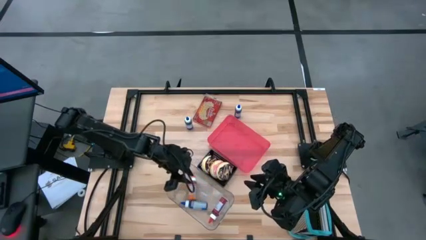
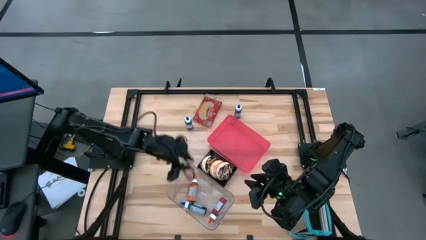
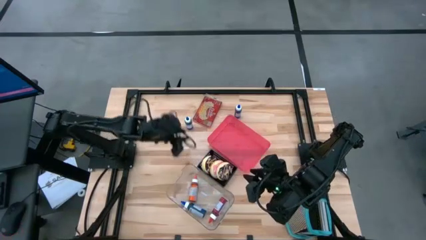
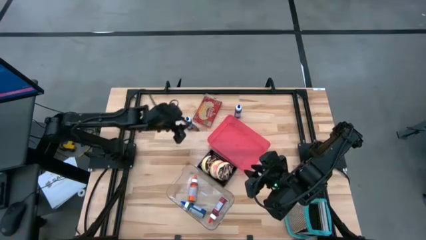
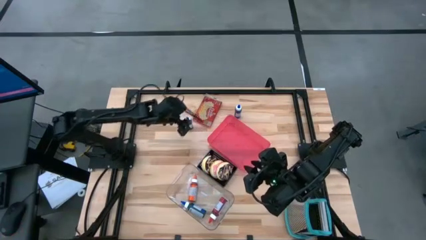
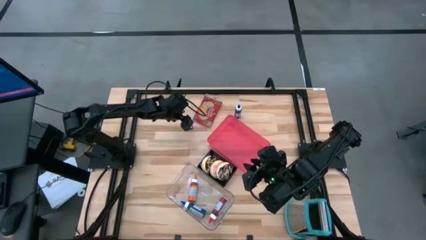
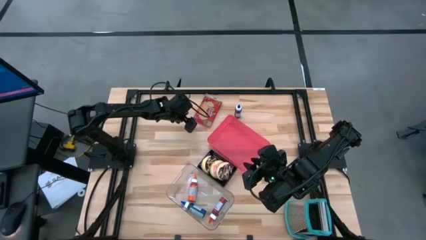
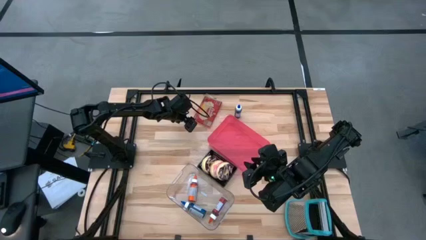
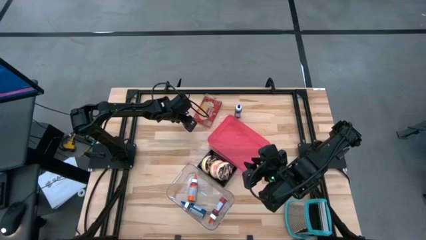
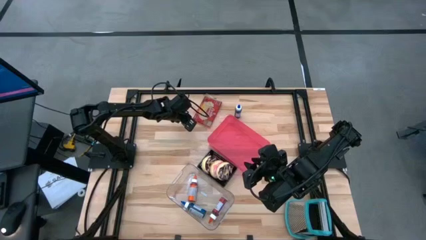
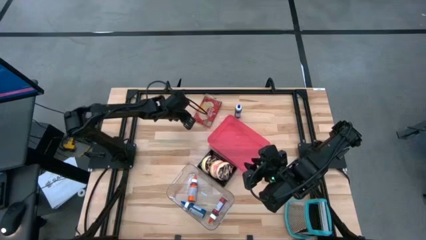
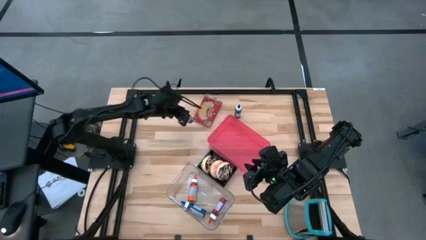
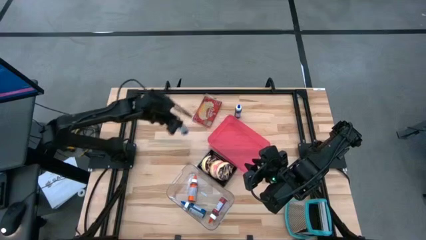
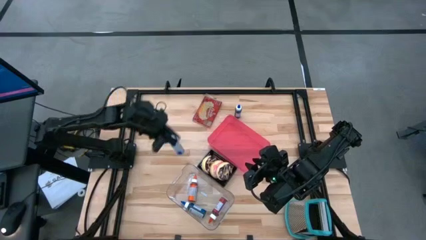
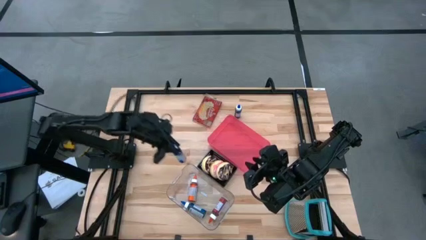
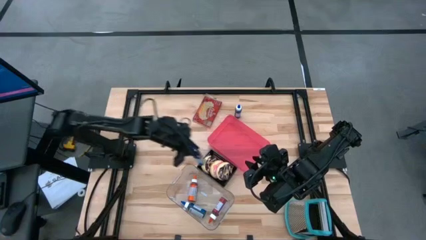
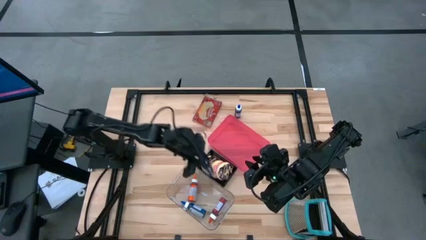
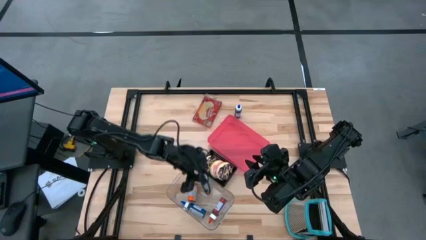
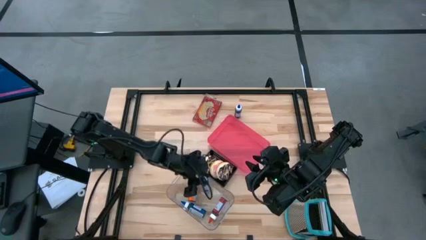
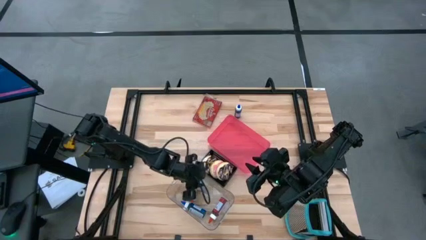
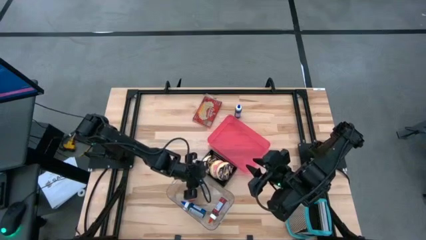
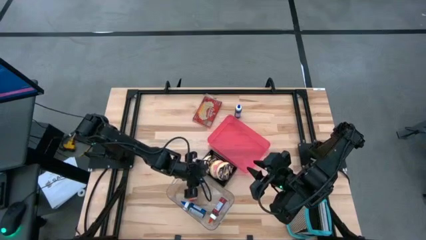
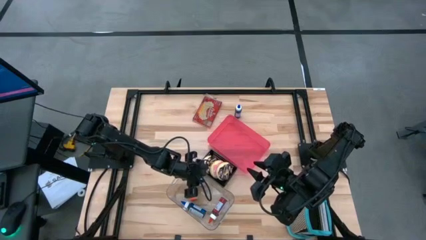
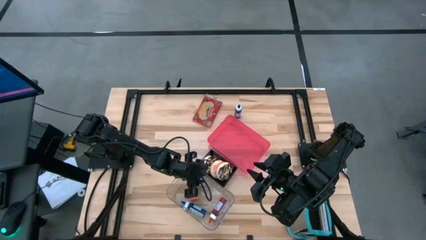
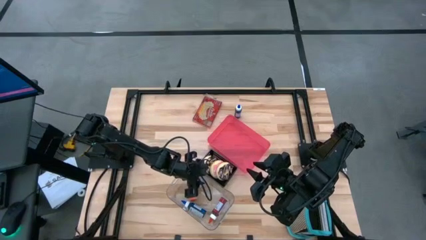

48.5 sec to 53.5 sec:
Put the left blue food coloring bottle into the transparent bin

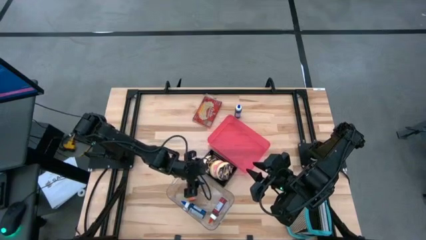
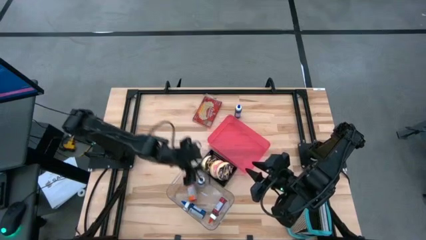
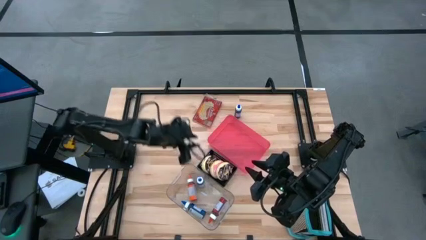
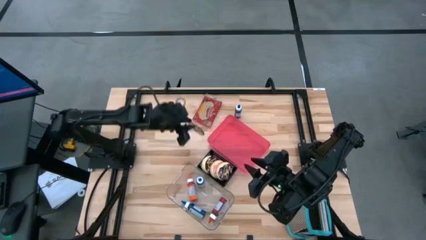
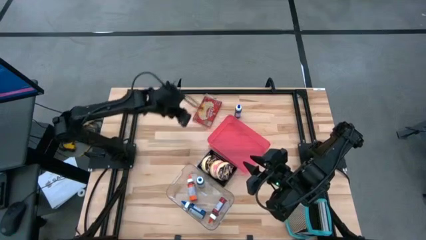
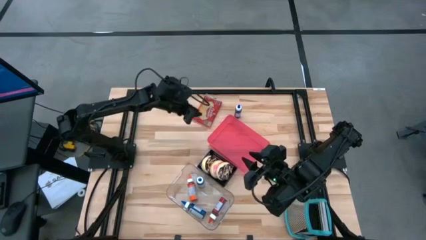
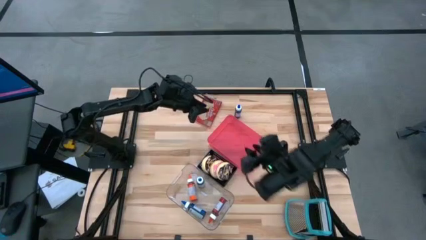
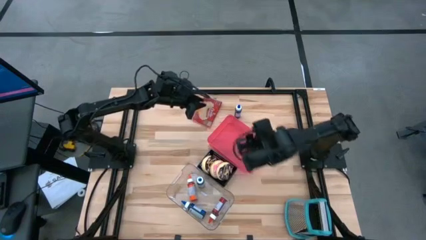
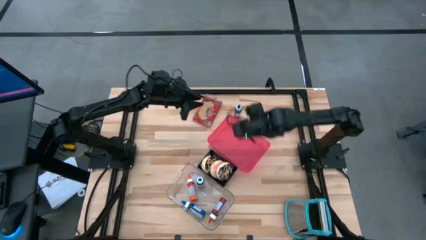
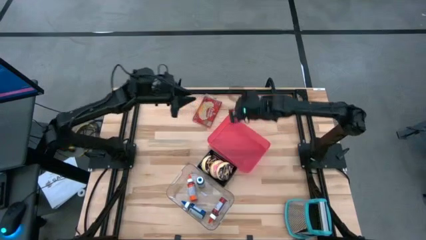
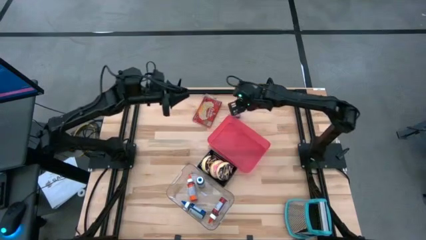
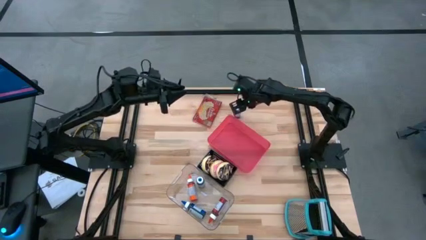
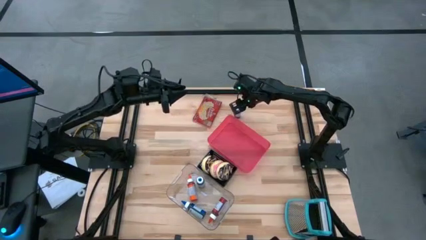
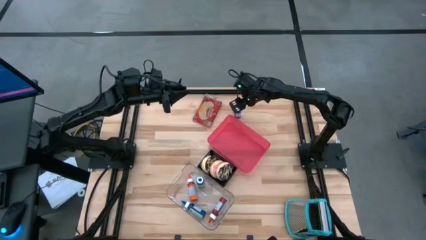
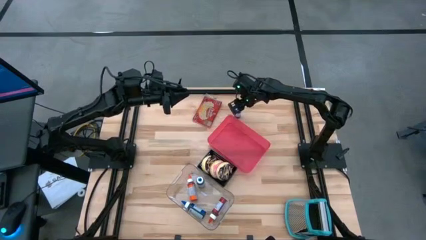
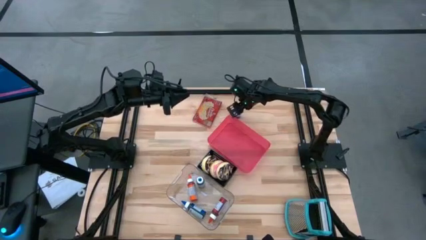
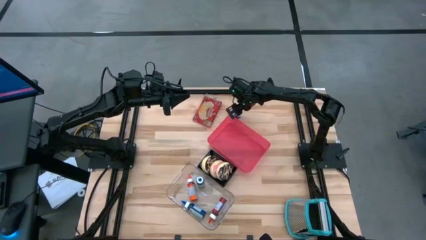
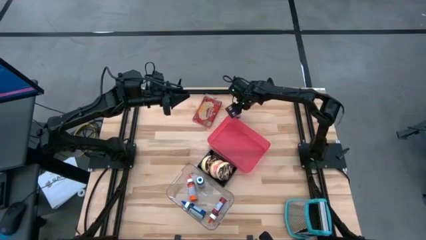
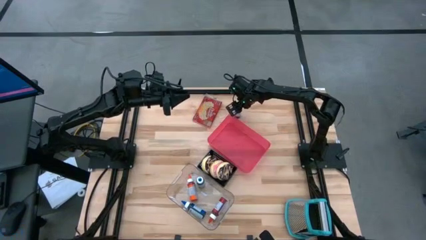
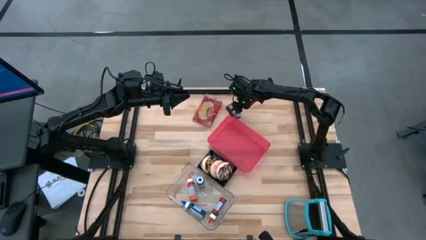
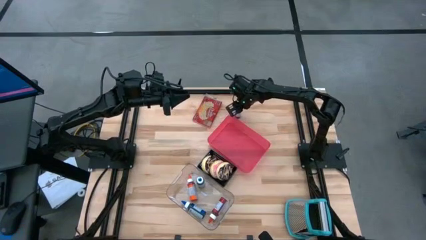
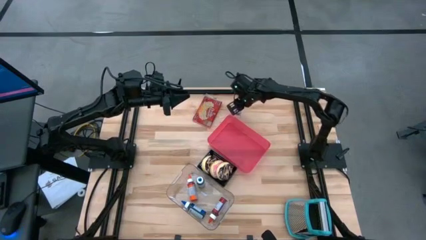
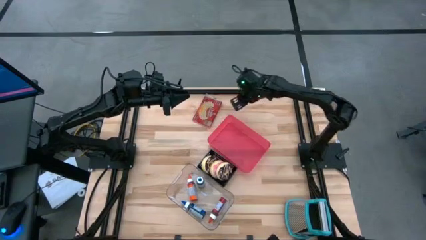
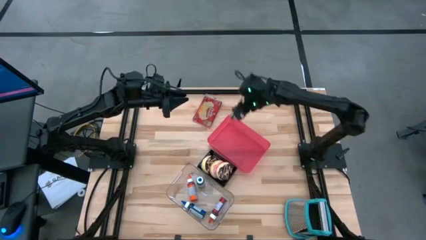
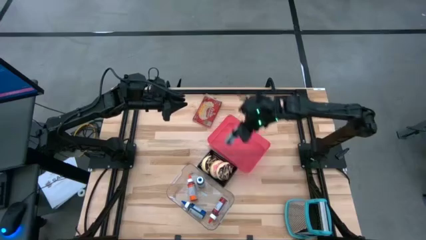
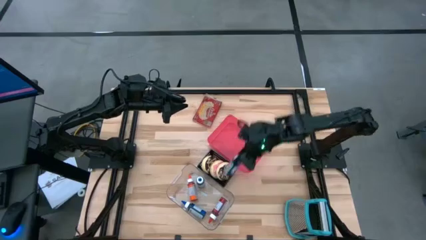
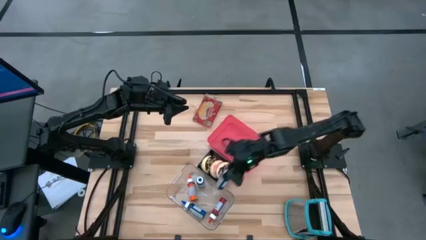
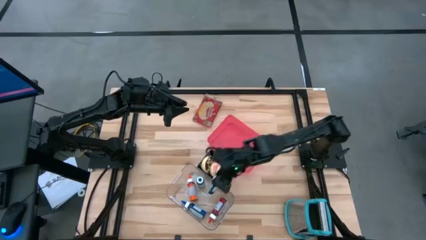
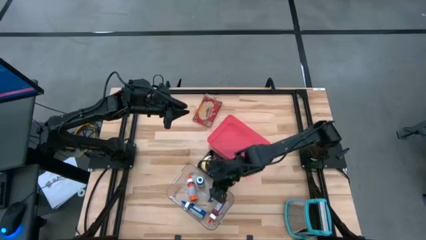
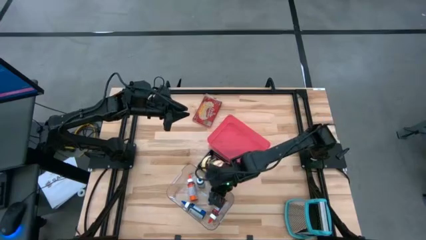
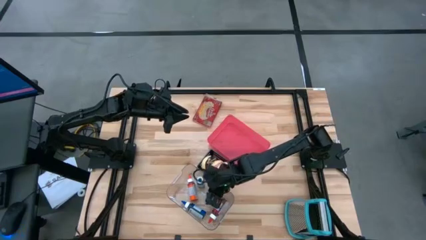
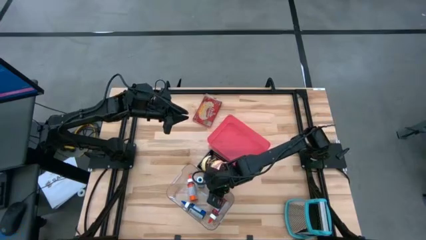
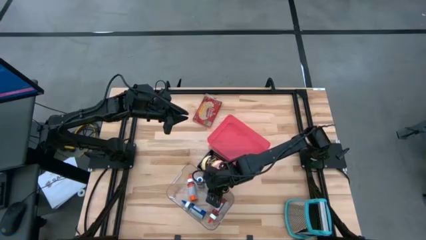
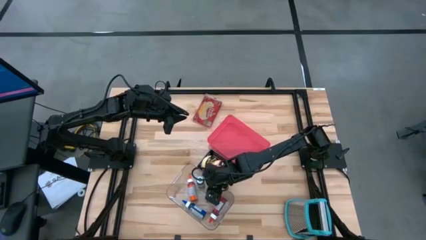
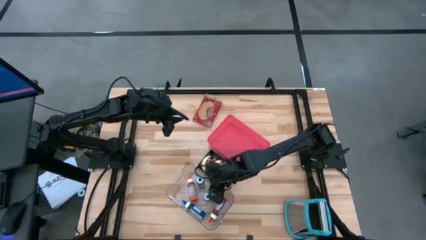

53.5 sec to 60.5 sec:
Put the blue food coloring bottle into the transparent bin

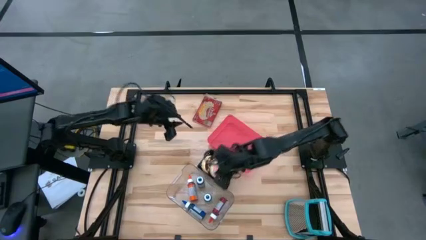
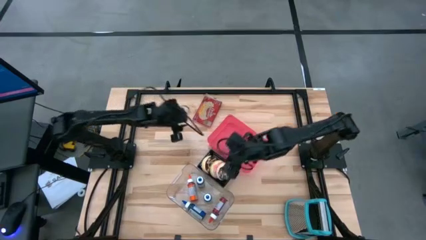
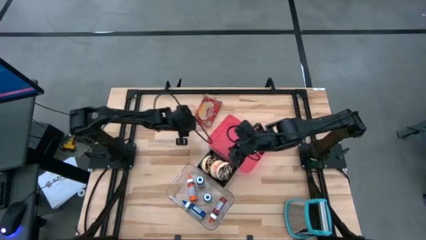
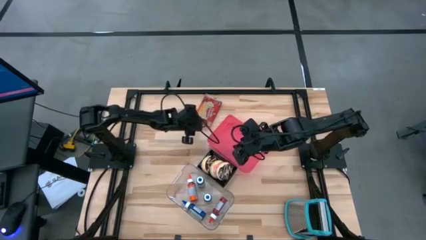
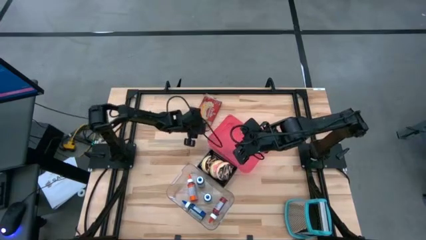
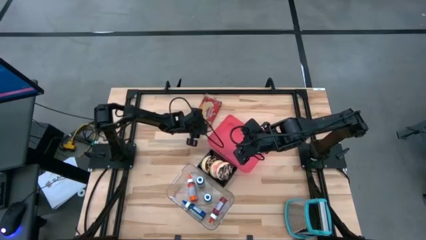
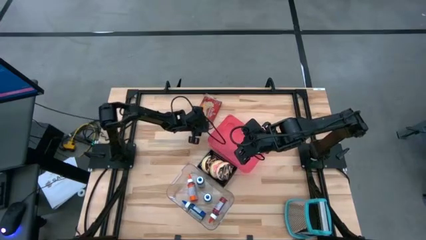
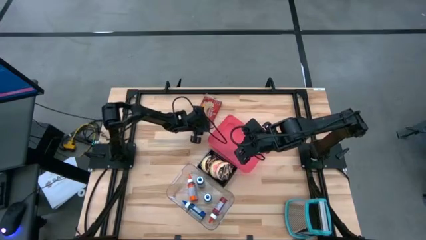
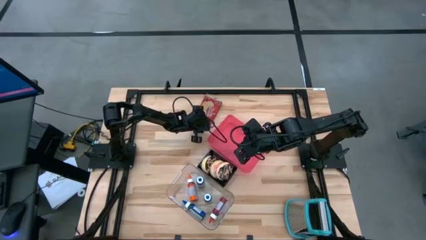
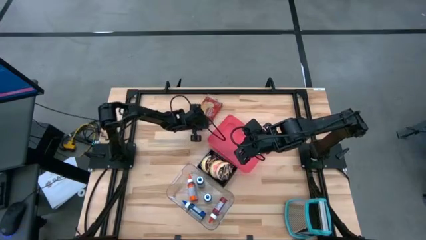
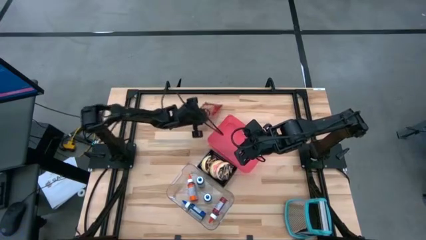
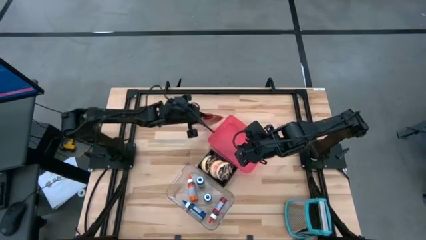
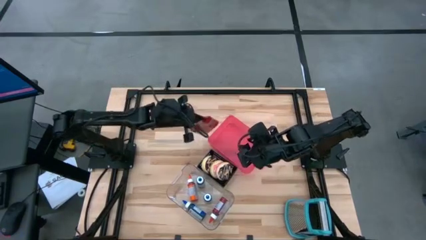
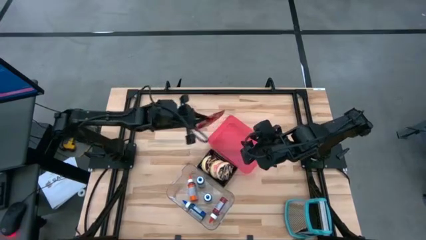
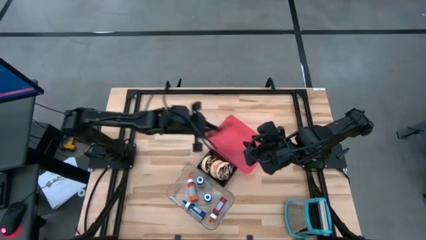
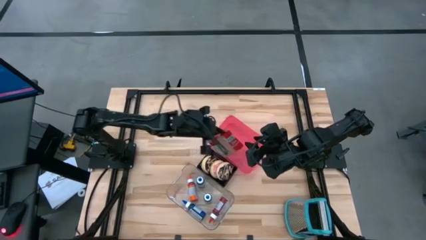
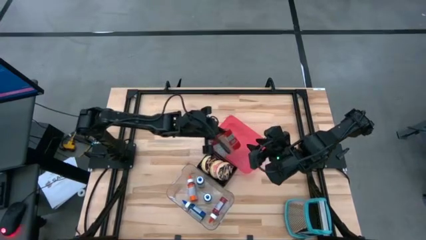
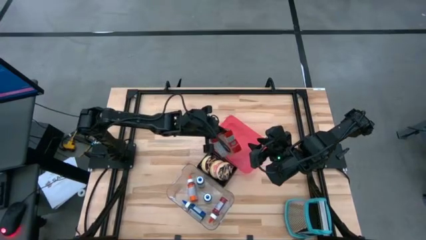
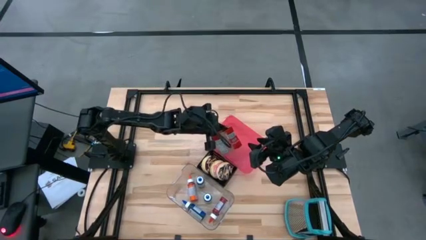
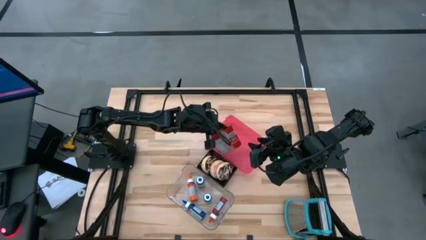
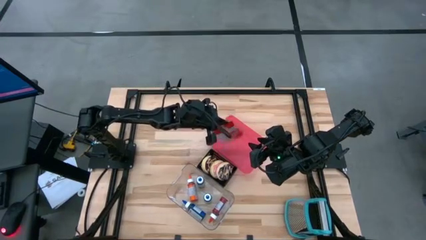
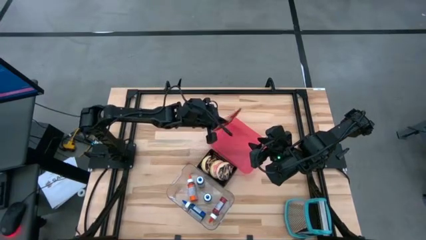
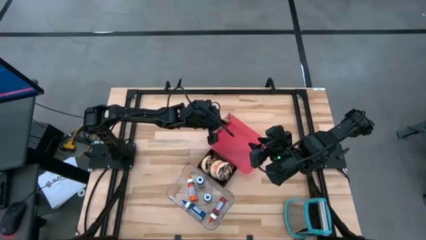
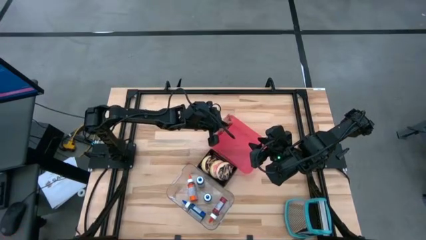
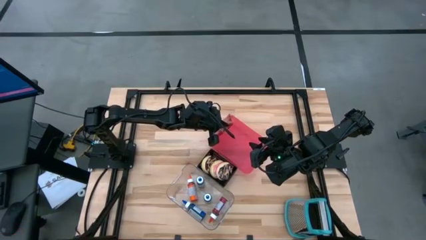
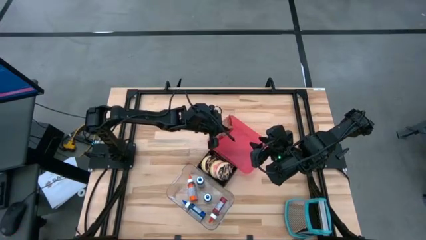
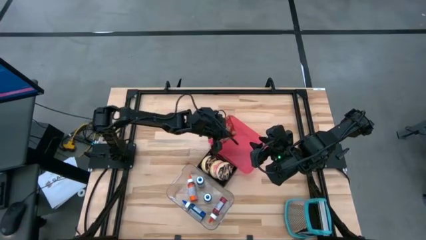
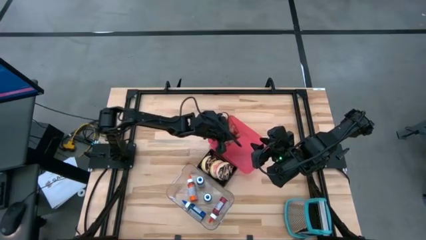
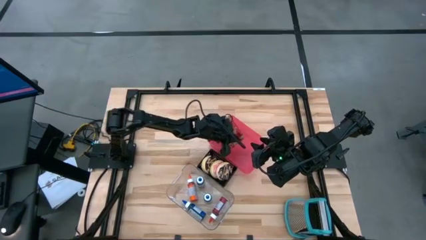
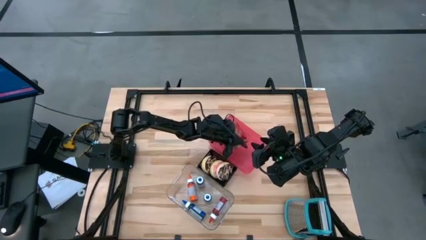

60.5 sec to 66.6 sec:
Put the popcorn bag into the pink bin
